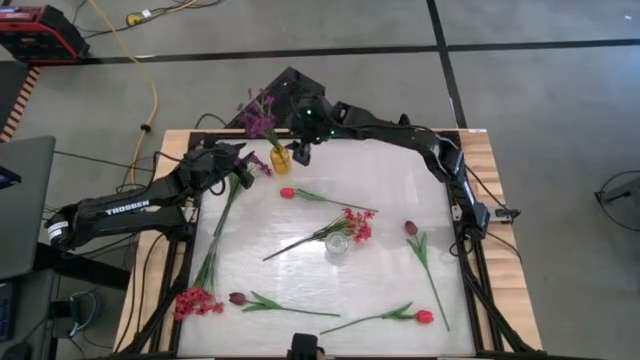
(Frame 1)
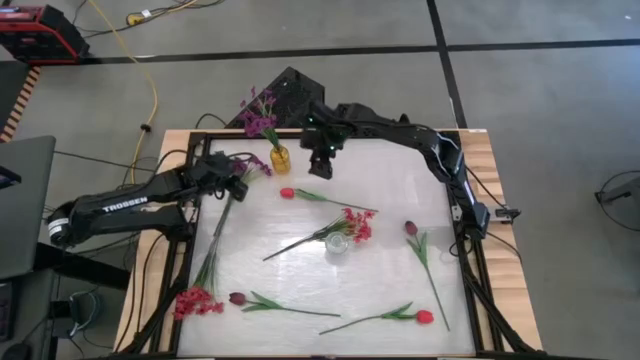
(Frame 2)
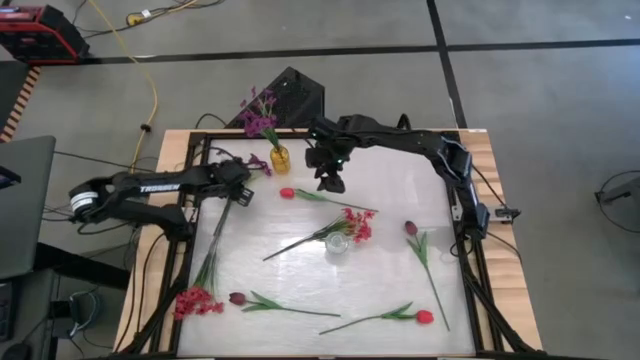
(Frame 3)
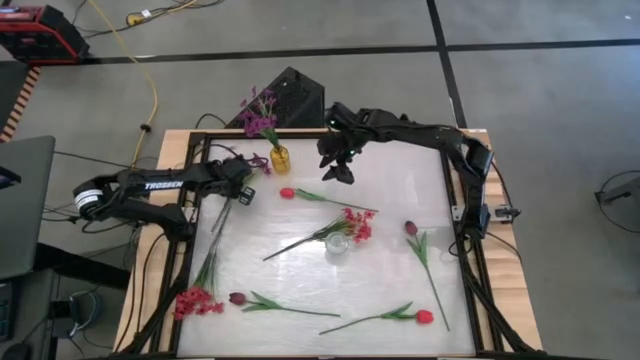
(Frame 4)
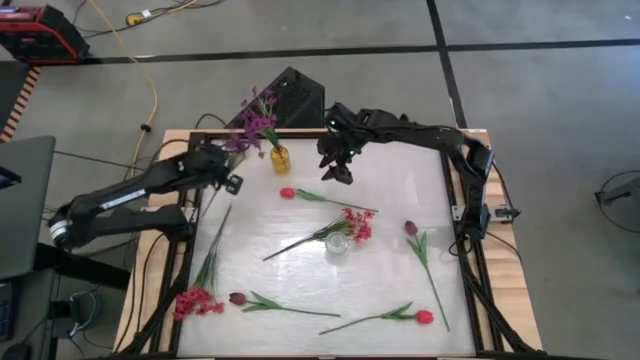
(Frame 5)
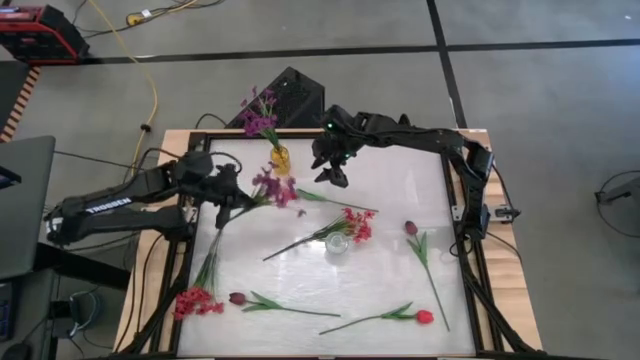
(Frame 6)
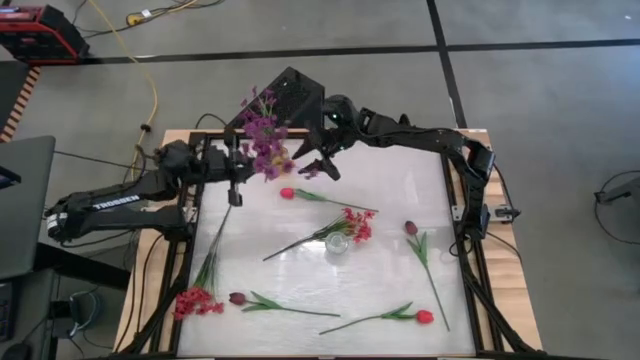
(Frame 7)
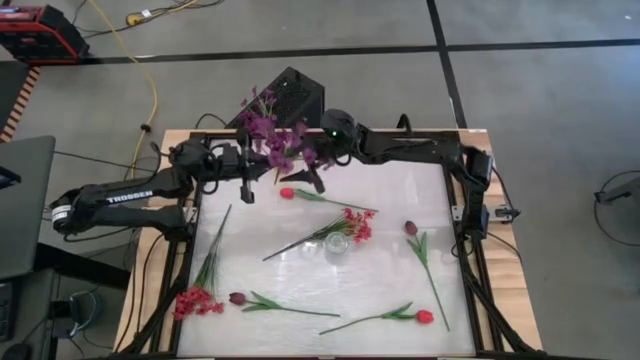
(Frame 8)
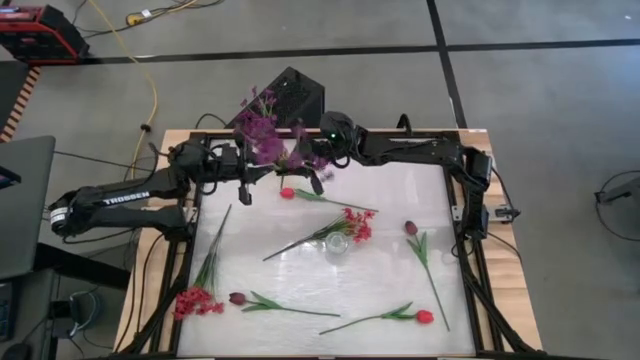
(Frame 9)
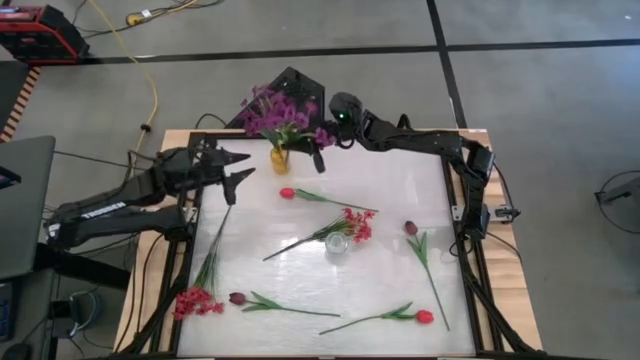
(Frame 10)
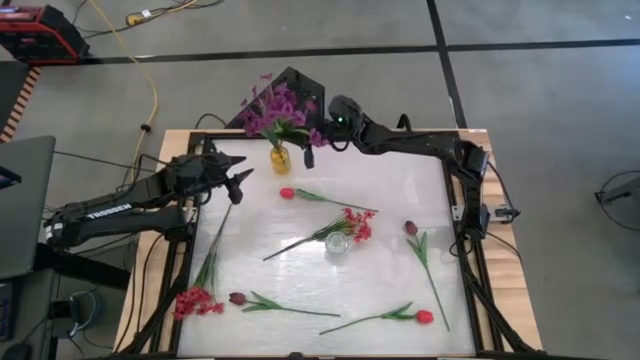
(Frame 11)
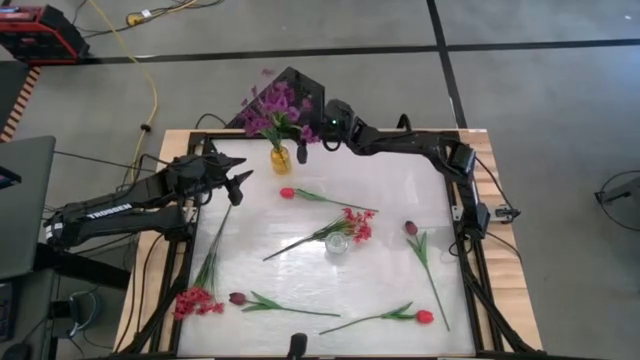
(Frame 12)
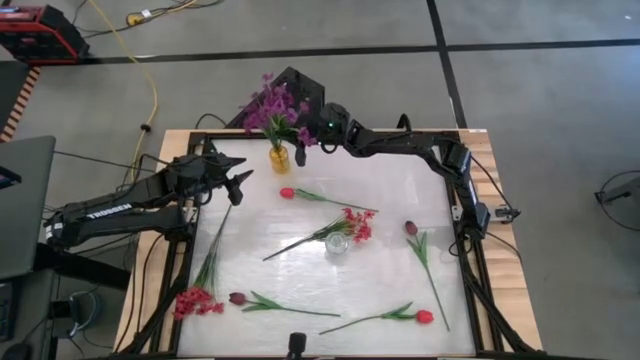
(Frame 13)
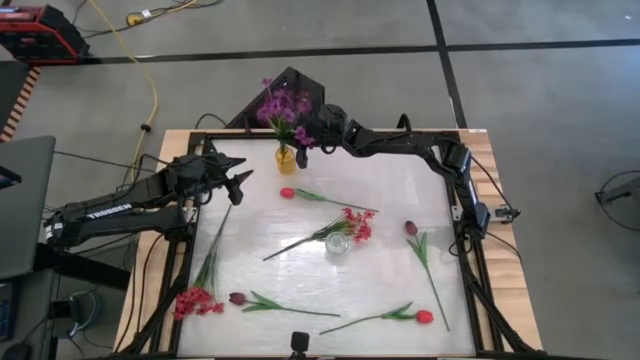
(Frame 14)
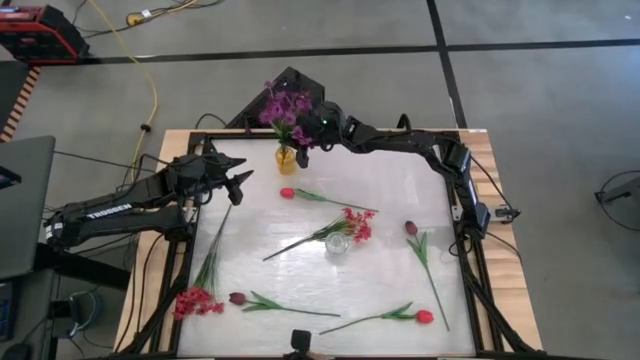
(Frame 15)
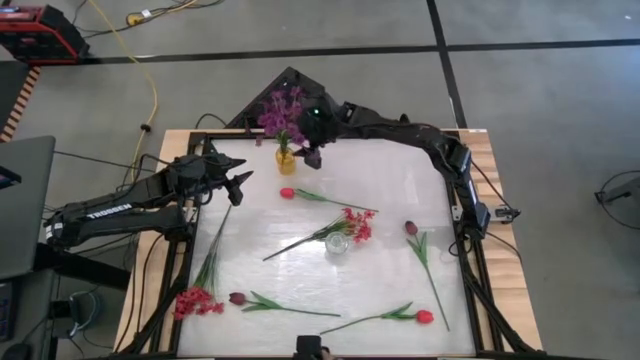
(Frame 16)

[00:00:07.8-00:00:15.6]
Task: Sort flowers into vase by color
Put the purple flowers into the yellow vase

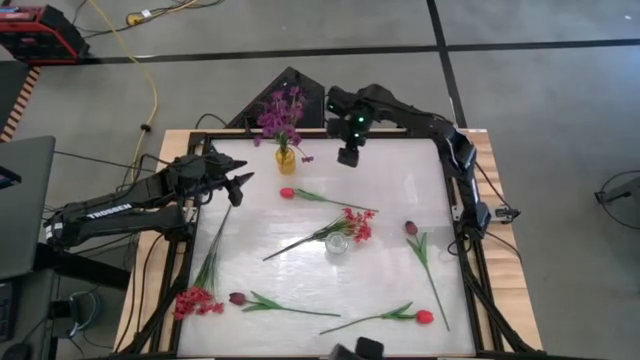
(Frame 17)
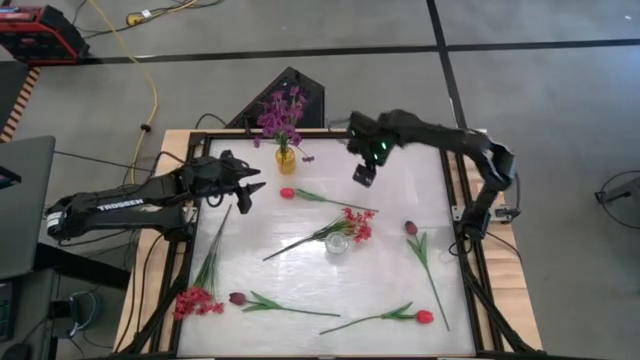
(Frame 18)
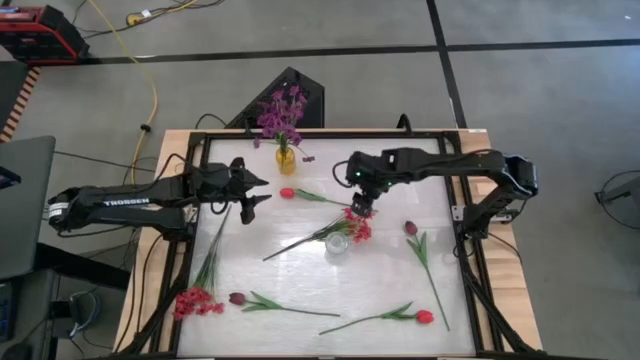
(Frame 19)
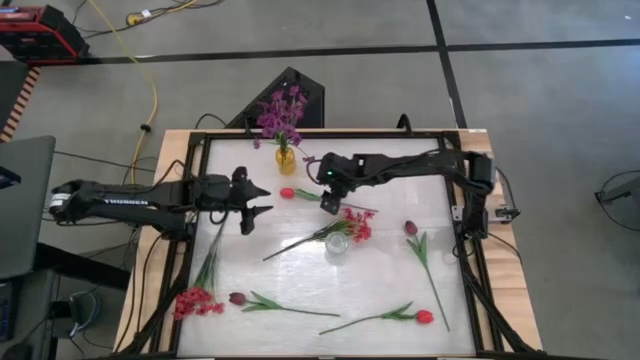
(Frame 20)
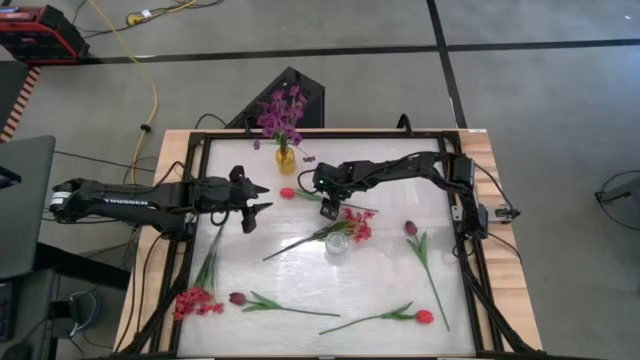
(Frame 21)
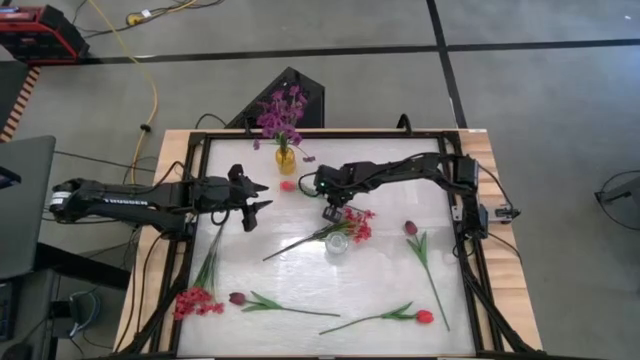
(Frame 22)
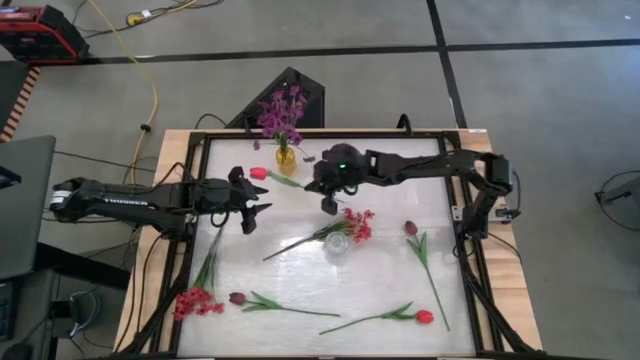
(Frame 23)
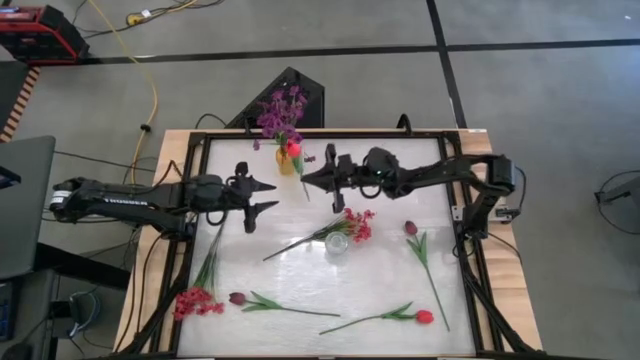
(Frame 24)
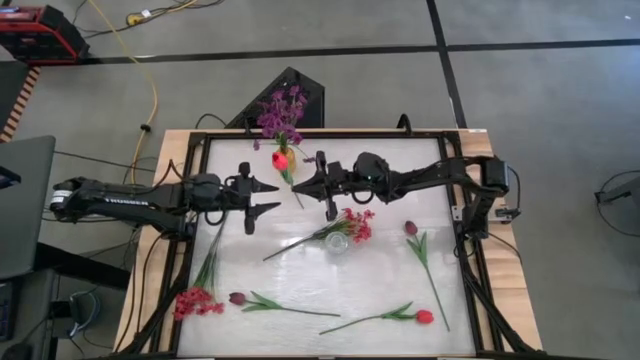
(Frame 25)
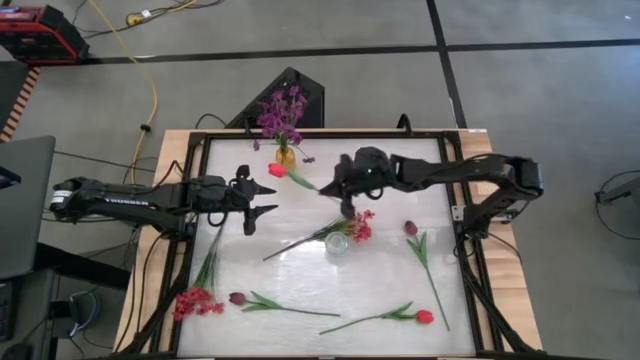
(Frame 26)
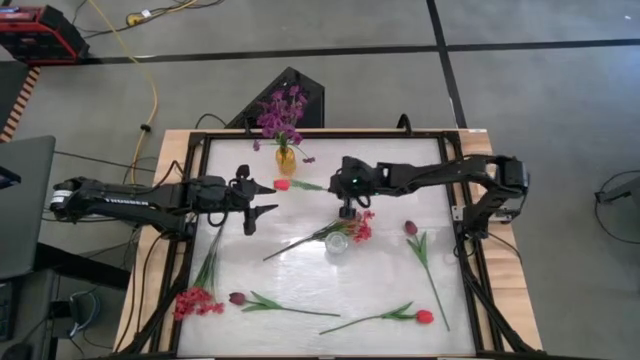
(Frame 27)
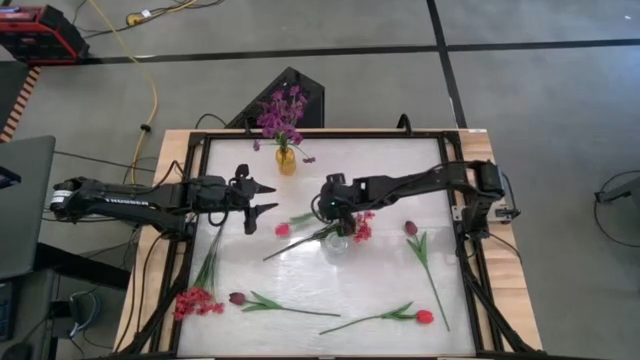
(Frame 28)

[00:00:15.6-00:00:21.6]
Put the red flower into the transparent vase

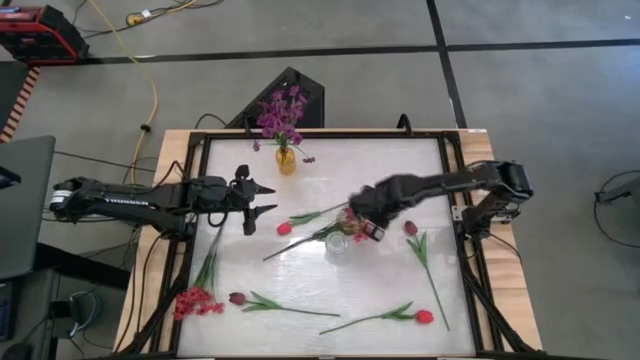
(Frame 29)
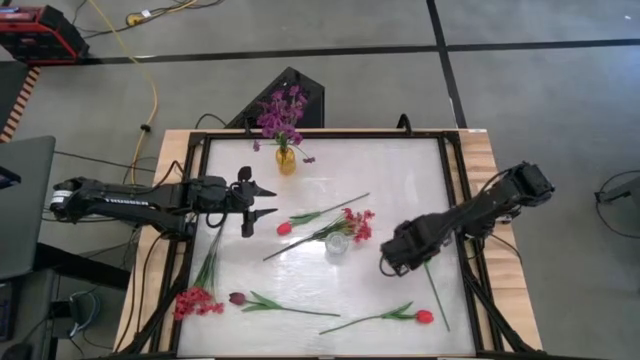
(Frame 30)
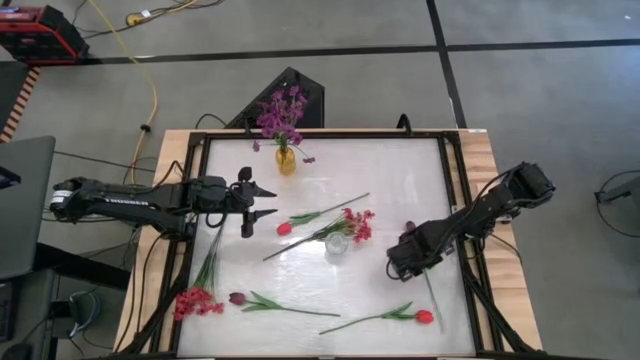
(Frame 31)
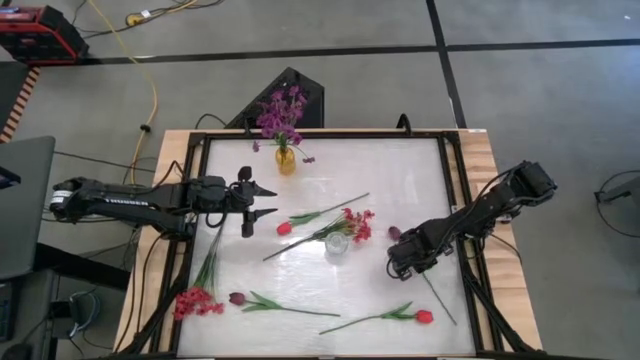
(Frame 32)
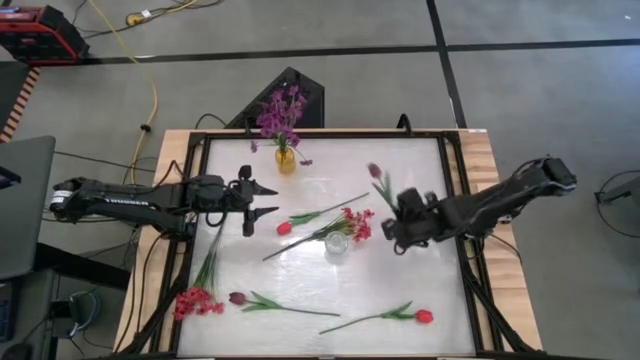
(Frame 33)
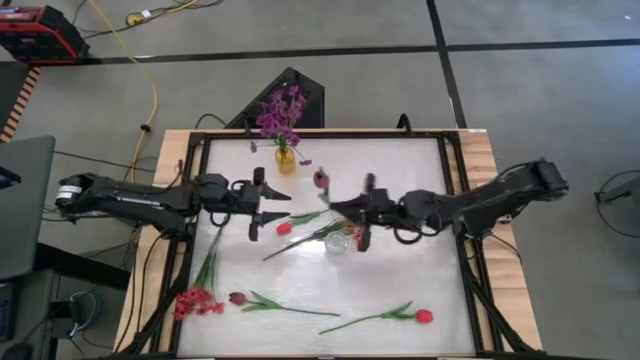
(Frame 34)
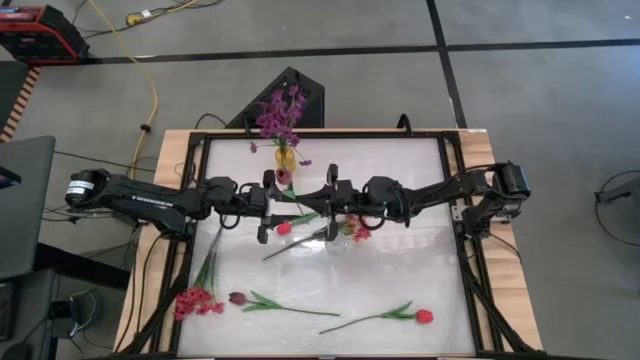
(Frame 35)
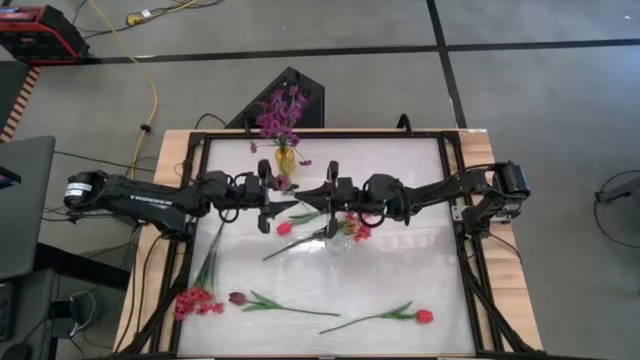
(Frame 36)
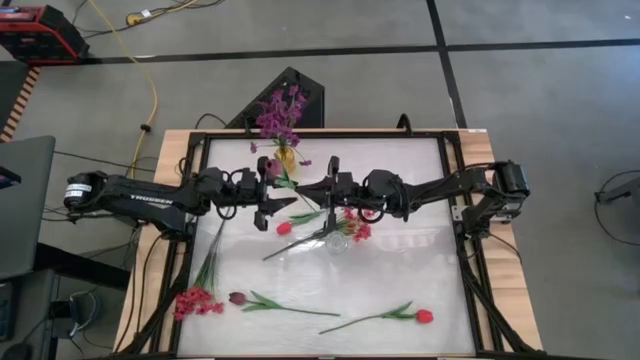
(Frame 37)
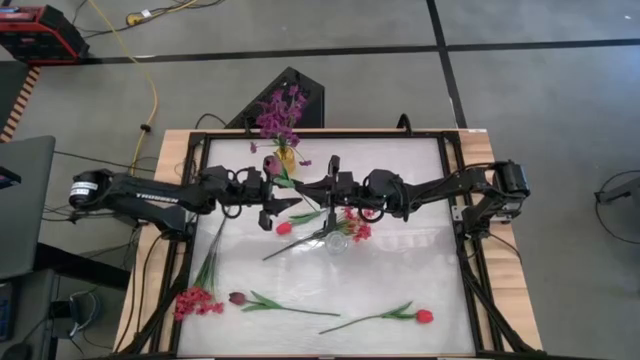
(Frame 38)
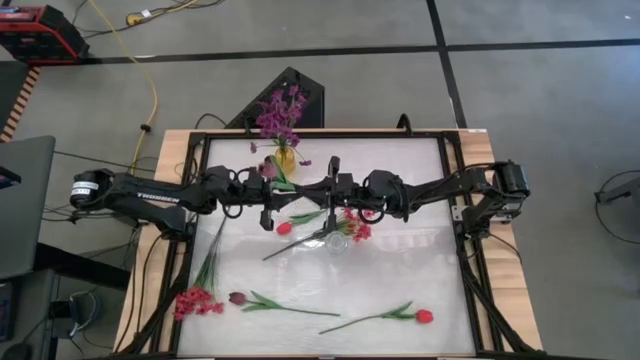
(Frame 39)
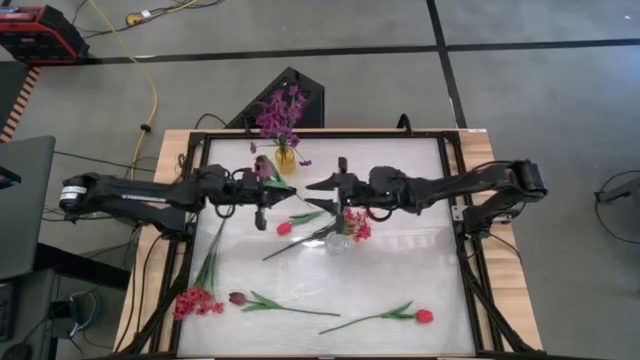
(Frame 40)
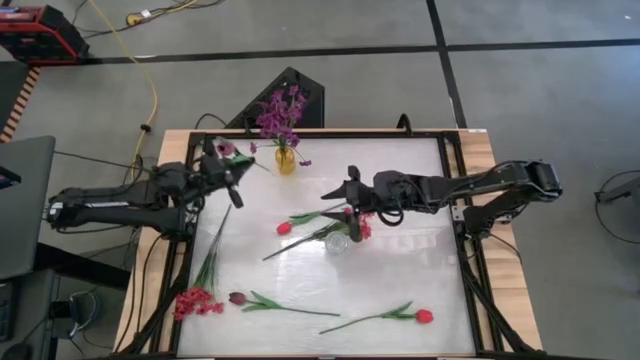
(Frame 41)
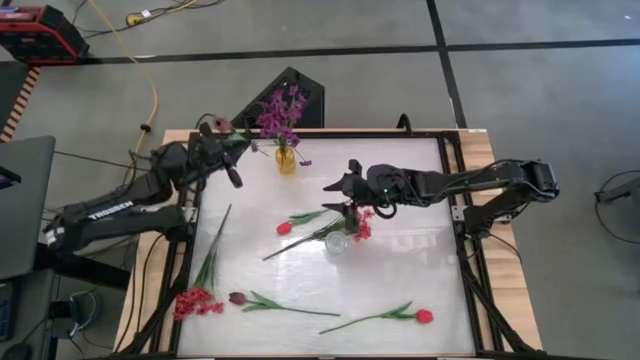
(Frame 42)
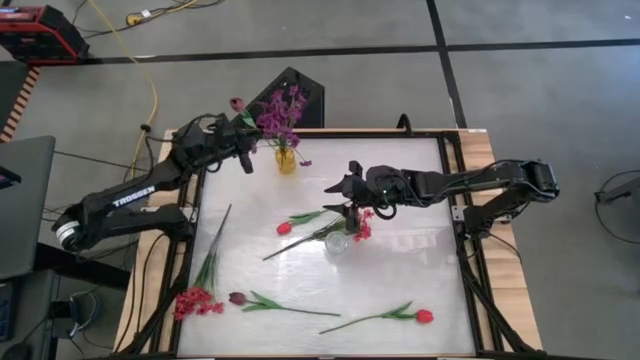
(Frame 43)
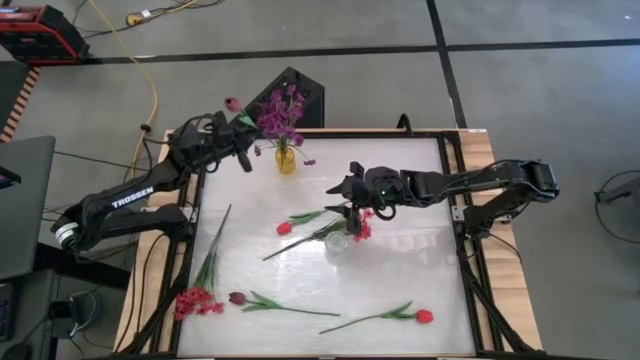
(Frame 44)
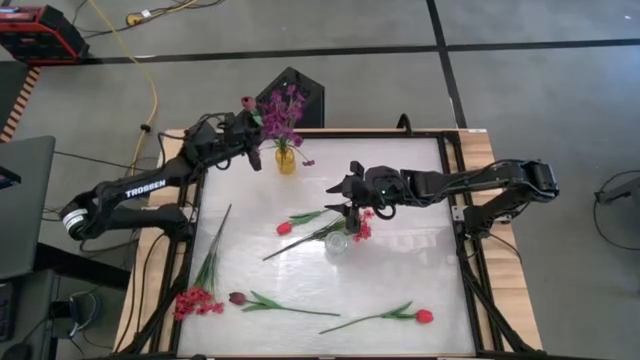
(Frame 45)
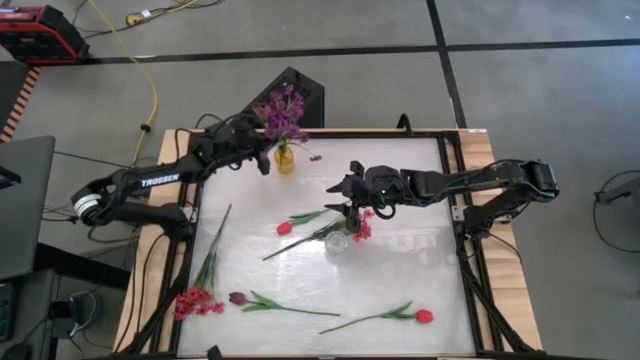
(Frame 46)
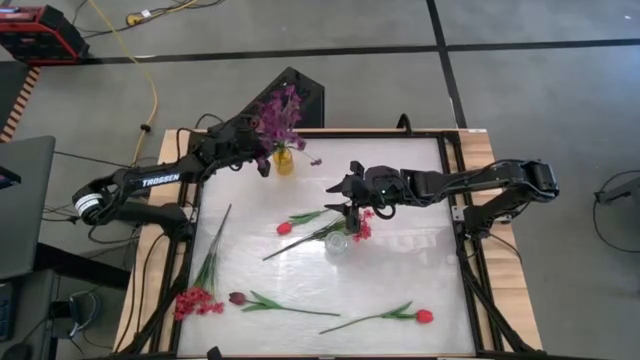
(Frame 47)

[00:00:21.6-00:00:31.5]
Put the right purple flower into the yellow vase
